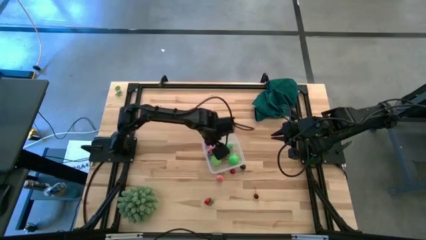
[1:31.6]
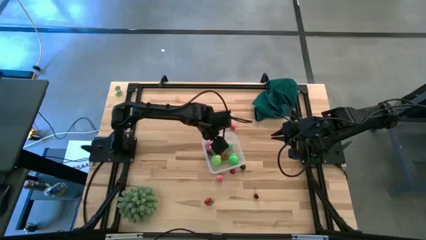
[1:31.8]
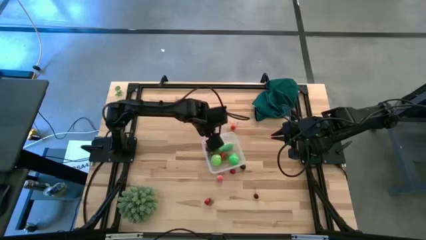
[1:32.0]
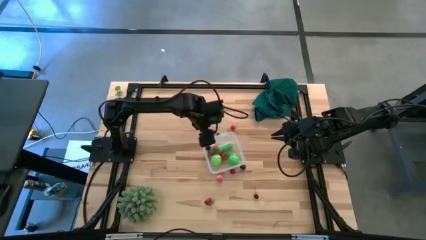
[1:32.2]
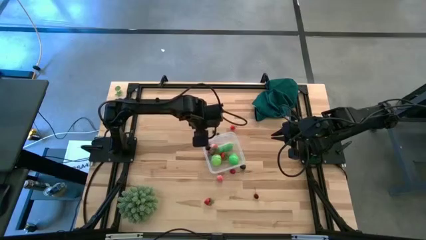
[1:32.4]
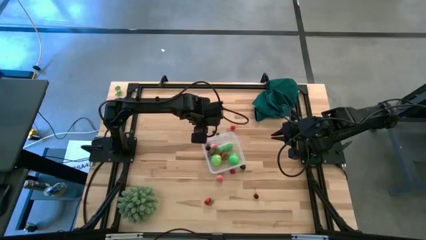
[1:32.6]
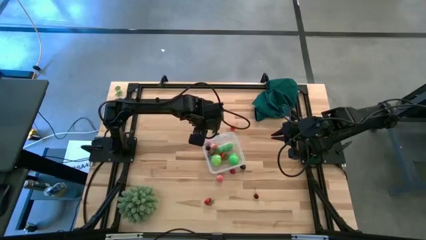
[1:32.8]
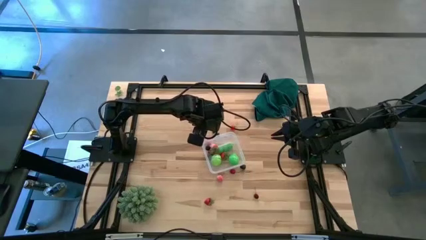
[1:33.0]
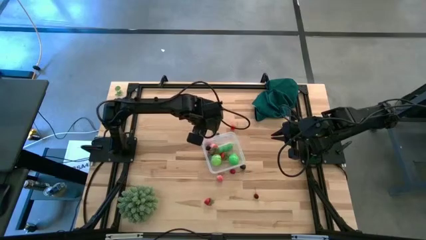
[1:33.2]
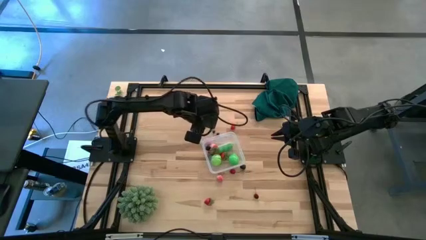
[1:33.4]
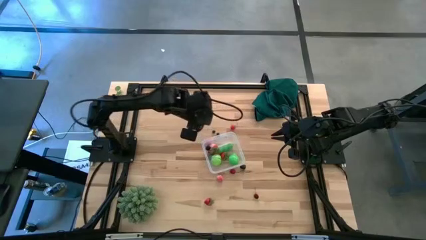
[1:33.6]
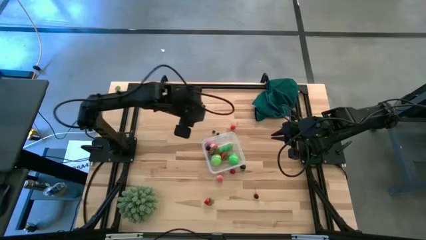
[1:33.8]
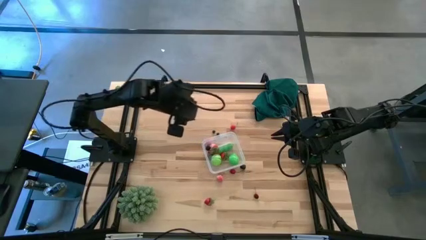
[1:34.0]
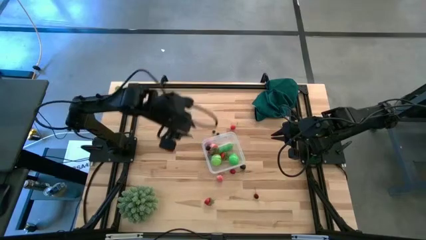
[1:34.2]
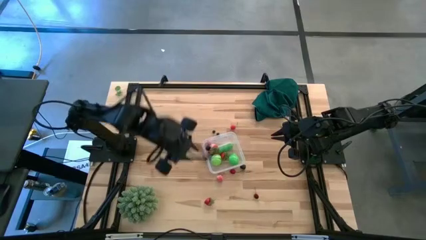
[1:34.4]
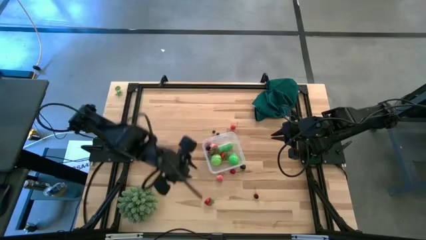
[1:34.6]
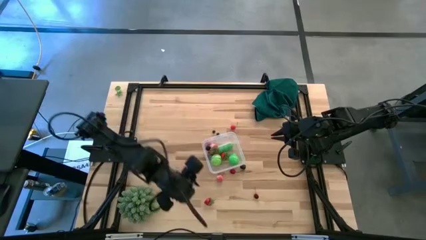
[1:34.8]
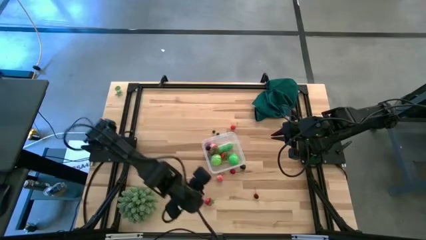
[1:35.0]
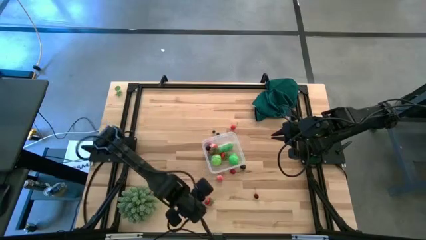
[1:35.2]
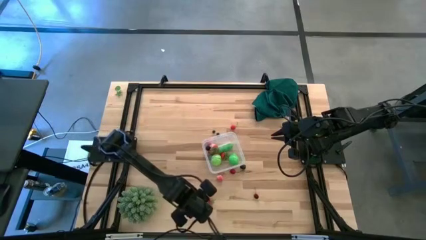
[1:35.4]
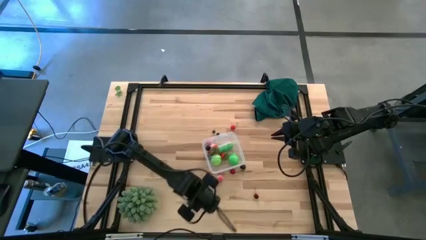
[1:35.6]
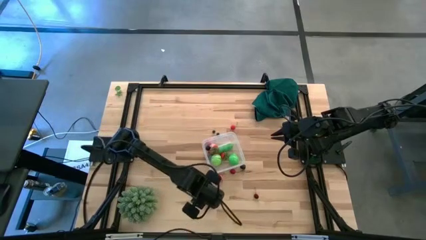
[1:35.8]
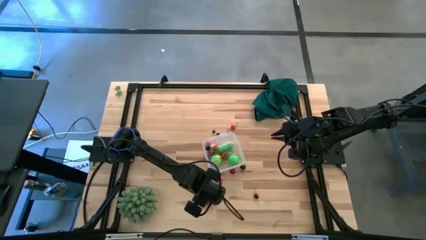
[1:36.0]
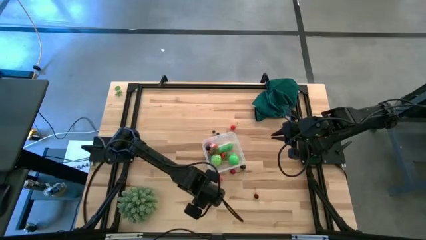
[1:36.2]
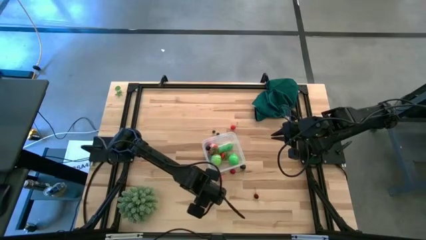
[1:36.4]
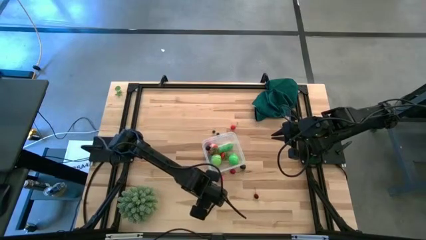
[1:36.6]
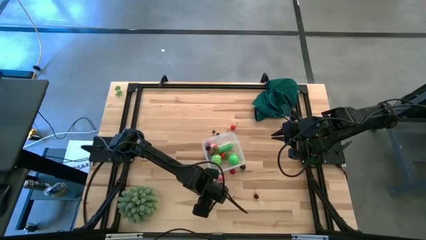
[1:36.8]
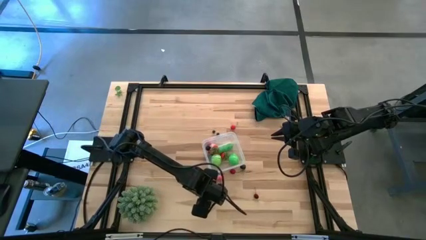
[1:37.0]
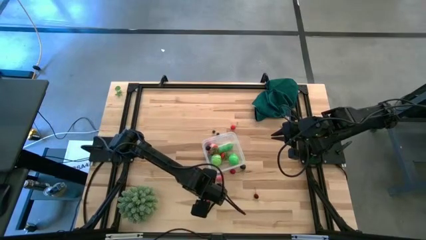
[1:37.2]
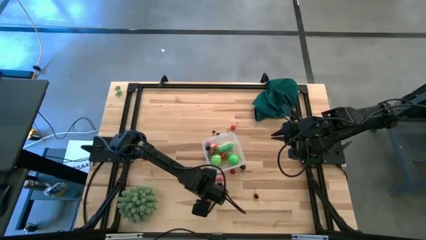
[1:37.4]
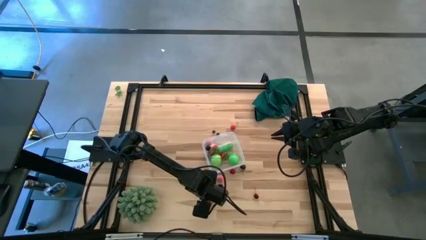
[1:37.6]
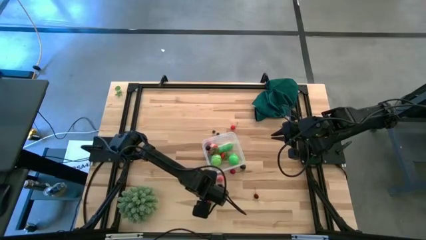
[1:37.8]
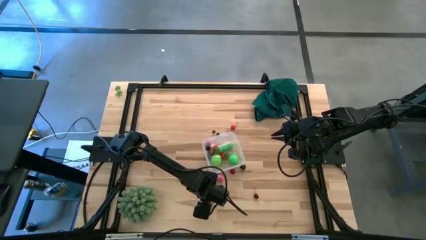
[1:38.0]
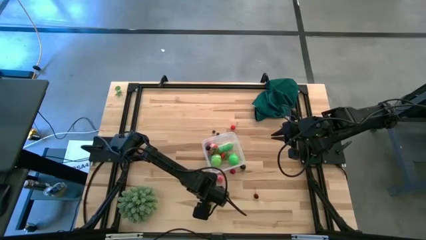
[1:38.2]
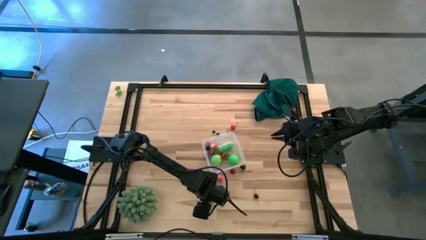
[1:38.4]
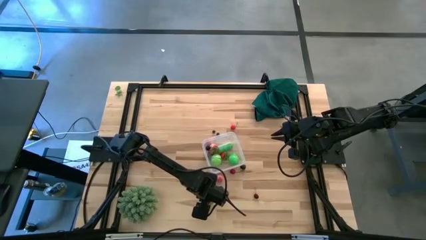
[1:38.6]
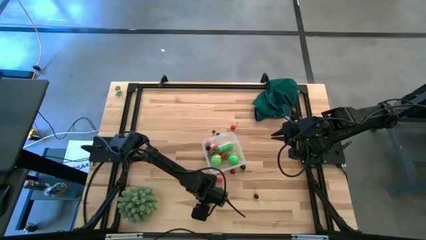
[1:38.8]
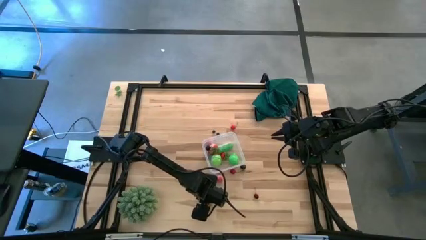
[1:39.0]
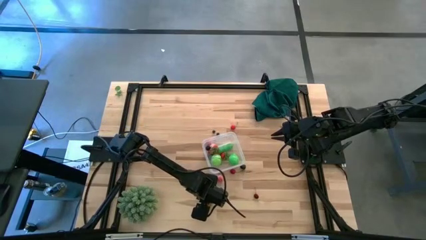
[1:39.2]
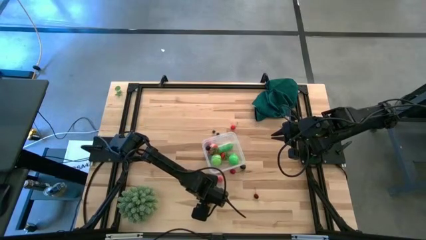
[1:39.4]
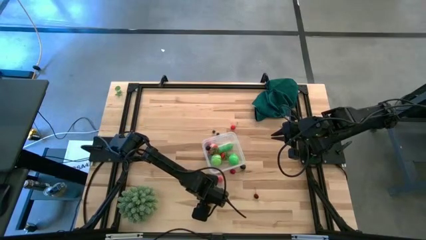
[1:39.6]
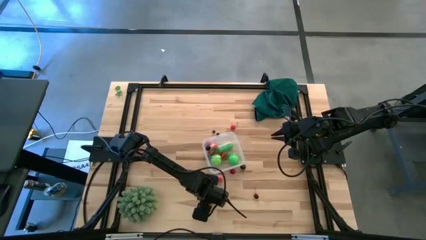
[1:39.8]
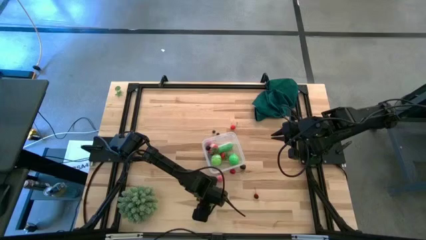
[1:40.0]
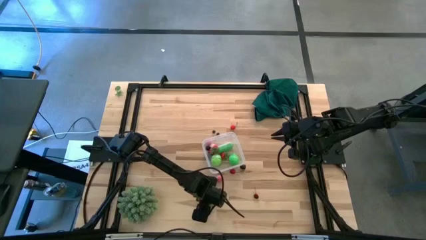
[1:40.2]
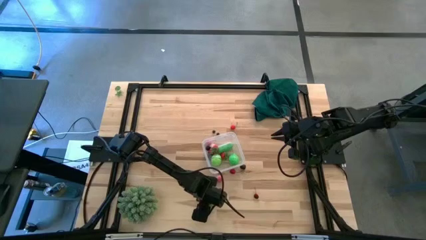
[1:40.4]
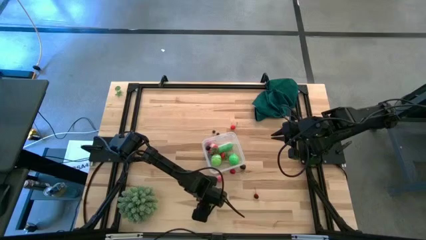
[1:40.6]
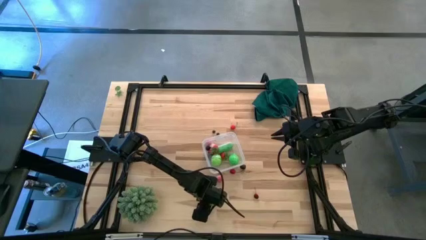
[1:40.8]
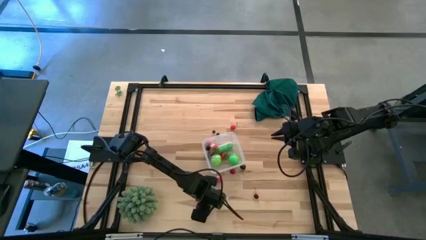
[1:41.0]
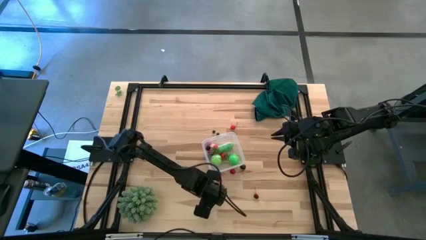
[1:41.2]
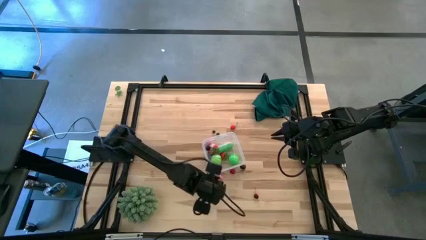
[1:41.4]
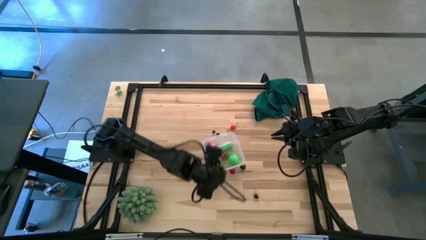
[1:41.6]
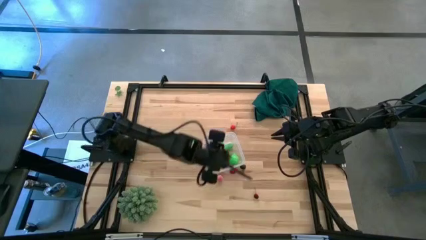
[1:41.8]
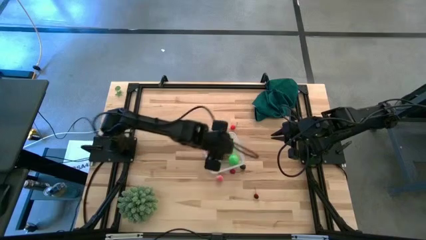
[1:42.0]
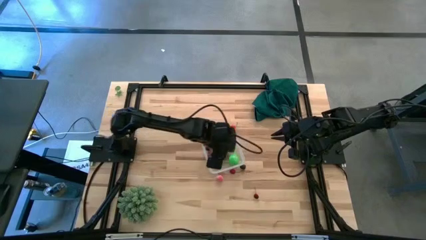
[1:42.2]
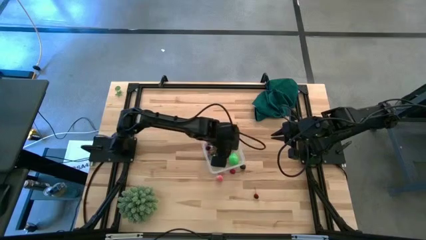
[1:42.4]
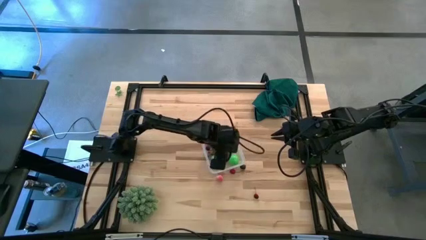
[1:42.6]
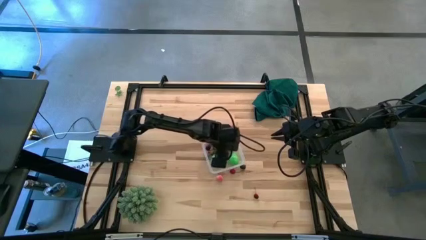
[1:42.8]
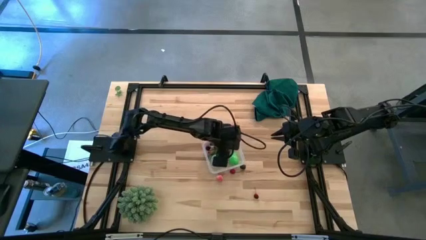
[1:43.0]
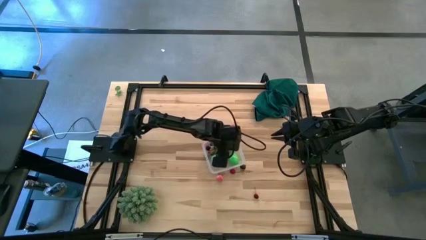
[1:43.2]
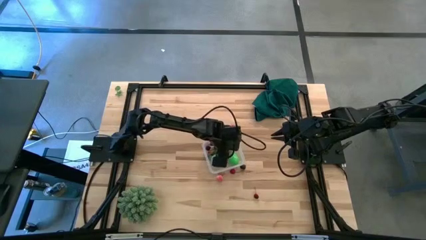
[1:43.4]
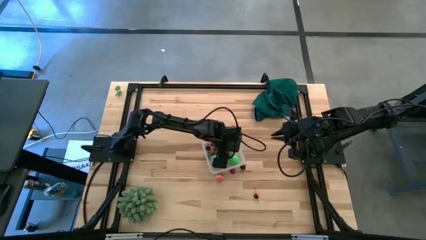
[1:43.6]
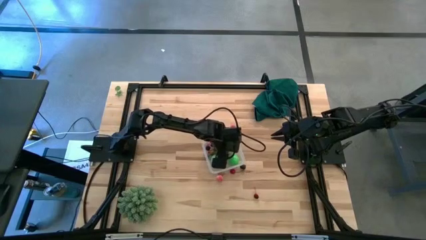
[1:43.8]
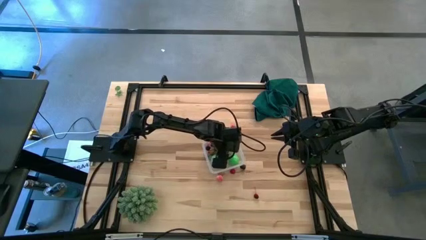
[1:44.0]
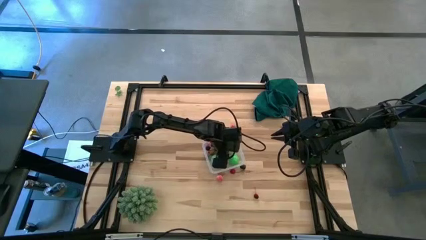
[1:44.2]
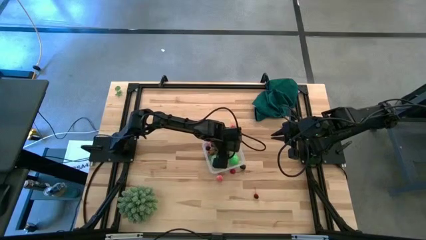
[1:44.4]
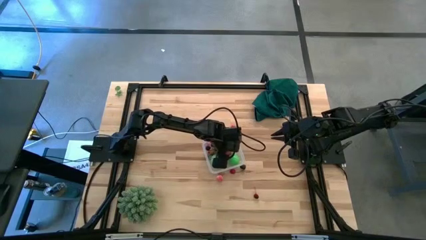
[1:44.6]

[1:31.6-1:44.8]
Task: Pick and placing Produce into tupperware
Put the red strawberry into the transparent container

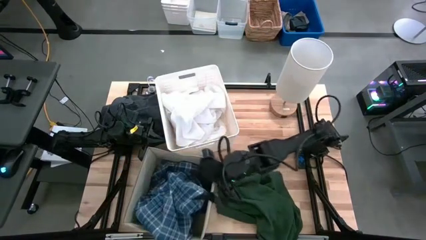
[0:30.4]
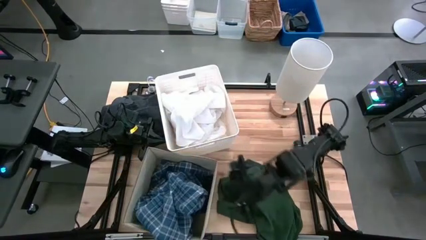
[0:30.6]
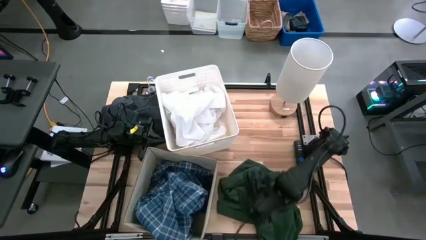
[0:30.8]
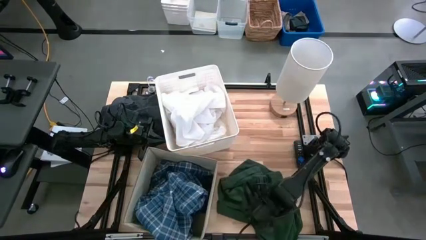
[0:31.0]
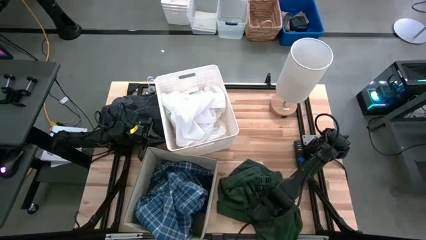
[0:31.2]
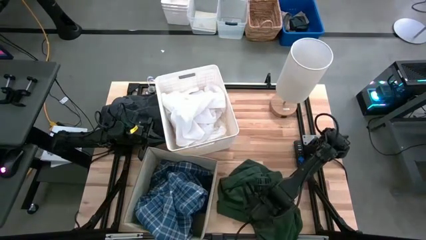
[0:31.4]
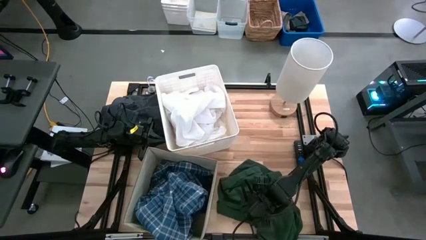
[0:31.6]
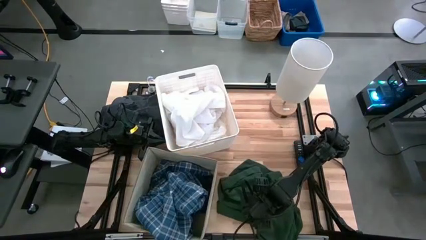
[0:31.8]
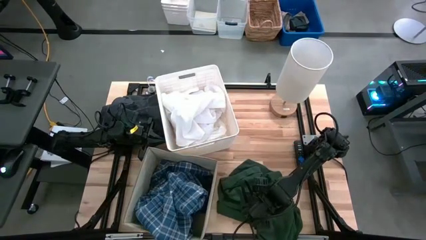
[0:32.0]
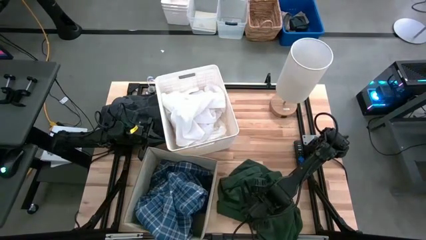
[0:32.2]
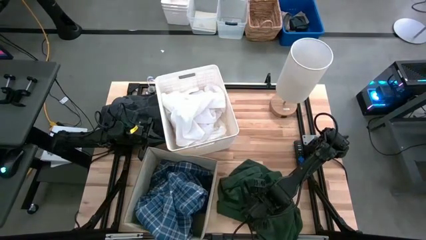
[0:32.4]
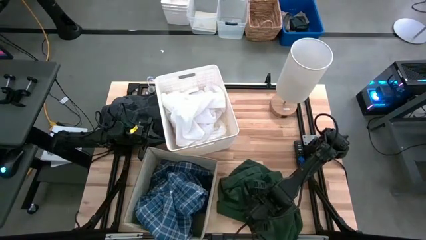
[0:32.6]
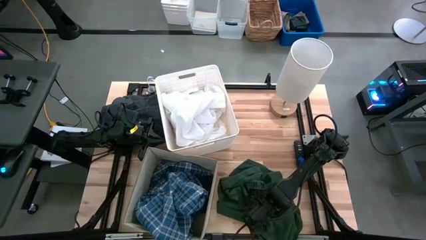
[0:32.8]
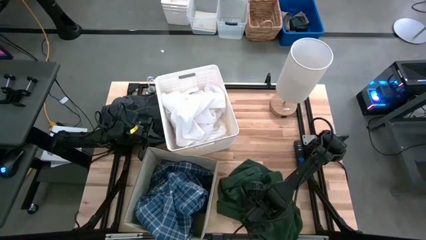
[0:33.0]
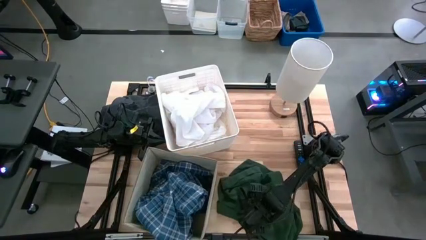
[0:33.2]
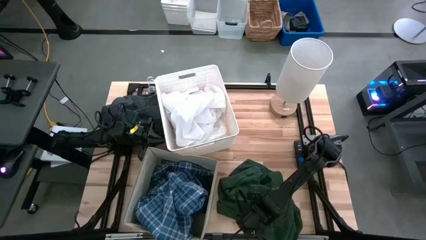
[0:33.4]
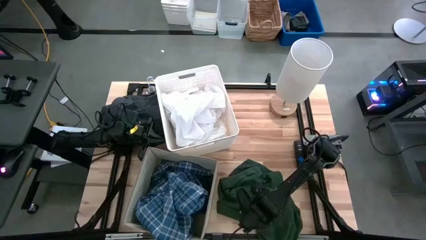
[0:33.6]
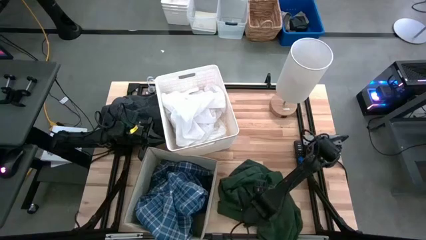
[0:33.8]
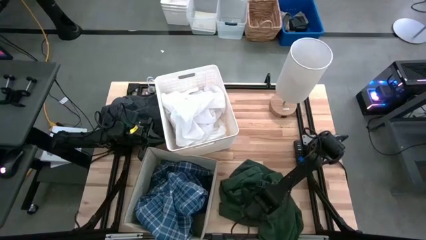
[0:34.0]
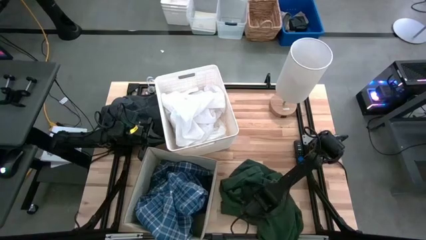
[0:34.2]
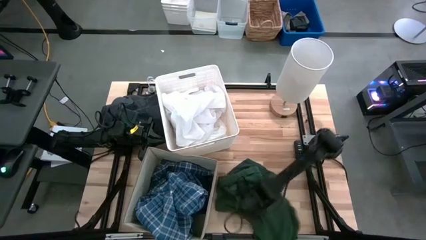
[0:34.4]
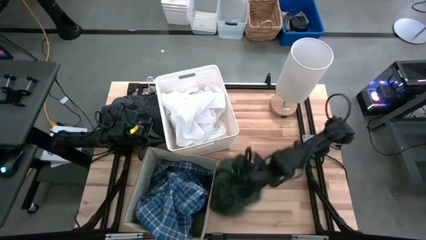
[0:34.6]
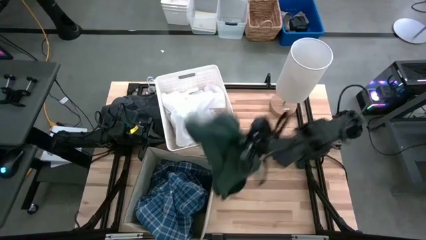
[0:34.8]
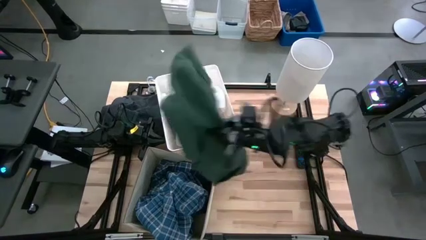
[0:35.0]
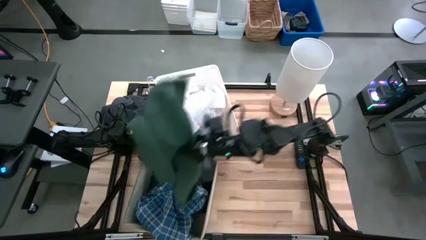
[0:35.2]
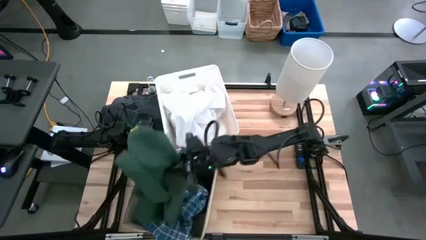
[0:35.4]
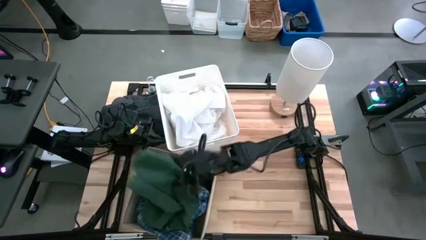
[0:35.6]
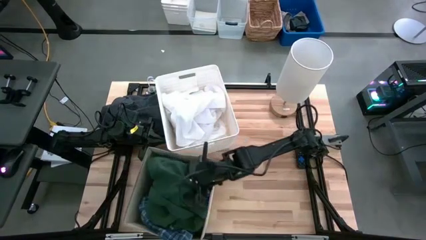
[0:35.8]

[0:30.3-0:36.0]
Task: Sort clothes
Put the green shirt into the laundry organizer
